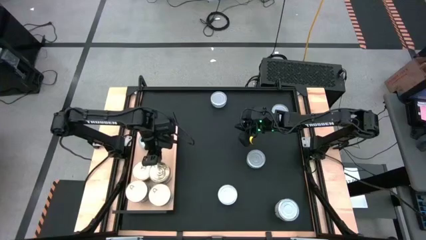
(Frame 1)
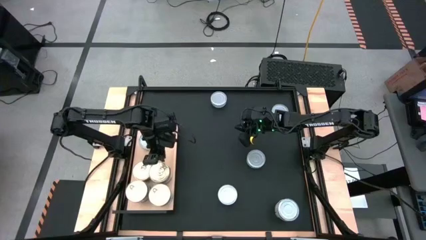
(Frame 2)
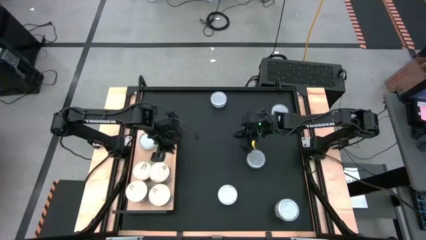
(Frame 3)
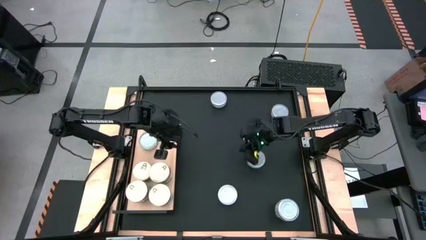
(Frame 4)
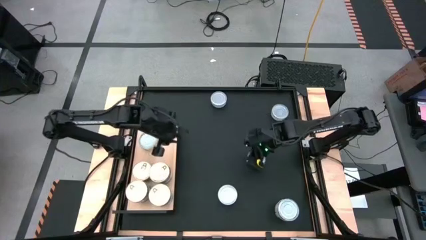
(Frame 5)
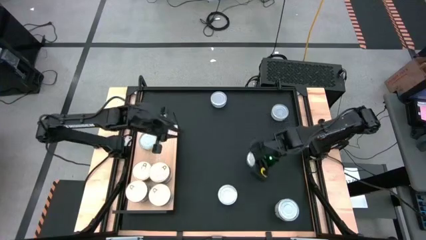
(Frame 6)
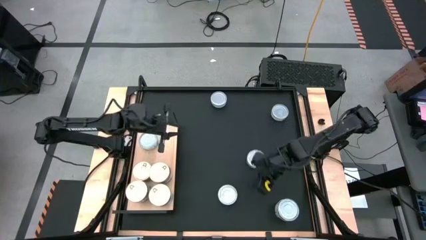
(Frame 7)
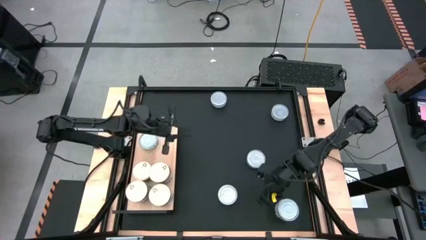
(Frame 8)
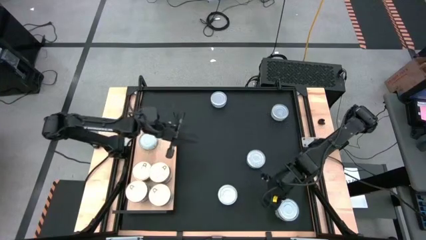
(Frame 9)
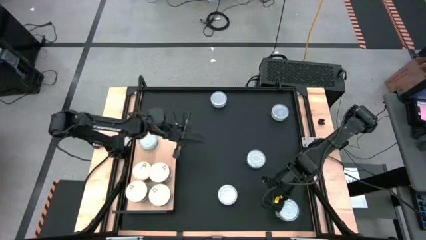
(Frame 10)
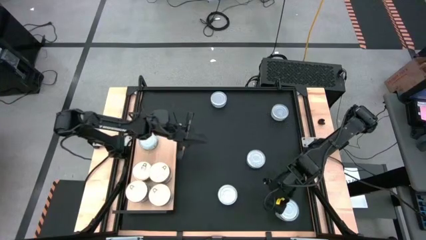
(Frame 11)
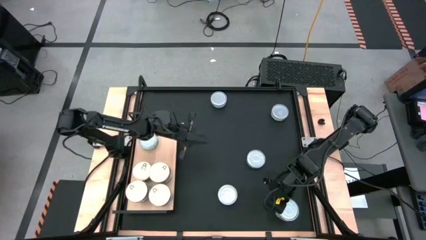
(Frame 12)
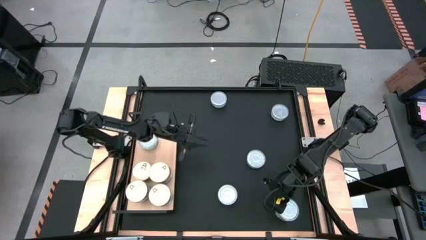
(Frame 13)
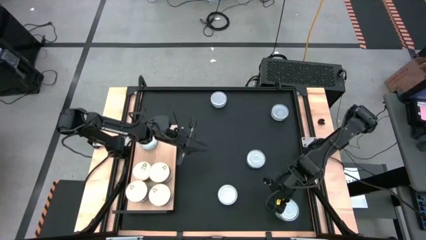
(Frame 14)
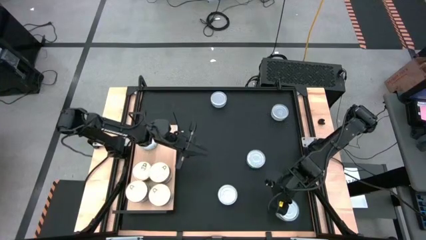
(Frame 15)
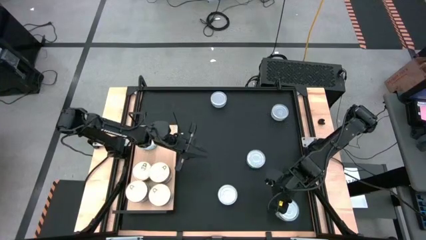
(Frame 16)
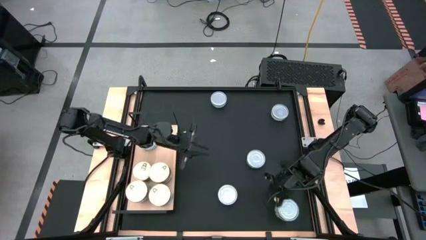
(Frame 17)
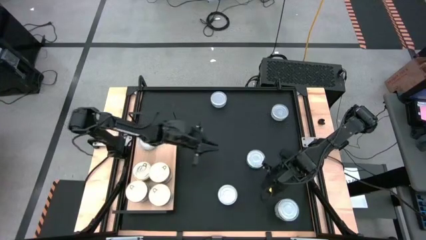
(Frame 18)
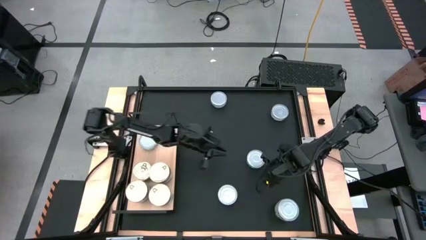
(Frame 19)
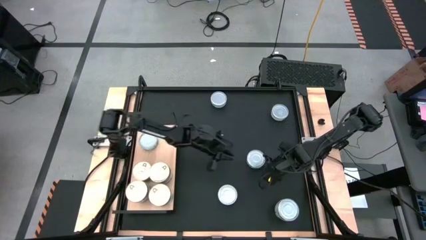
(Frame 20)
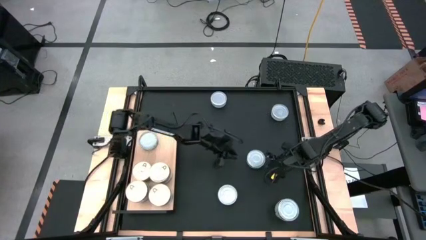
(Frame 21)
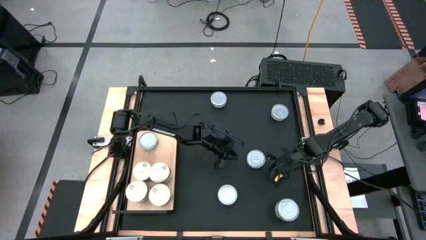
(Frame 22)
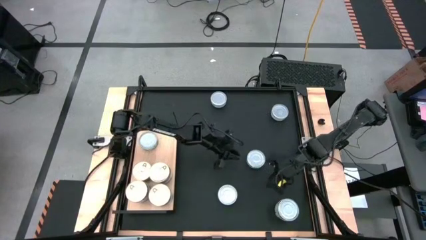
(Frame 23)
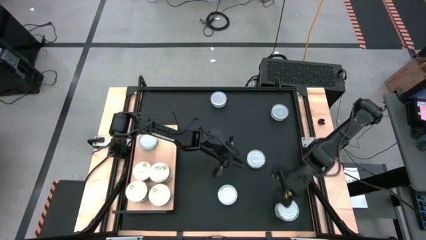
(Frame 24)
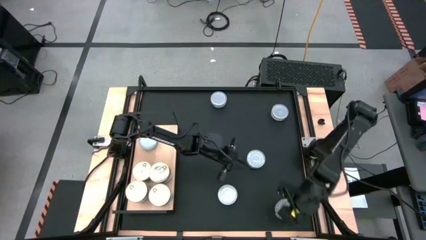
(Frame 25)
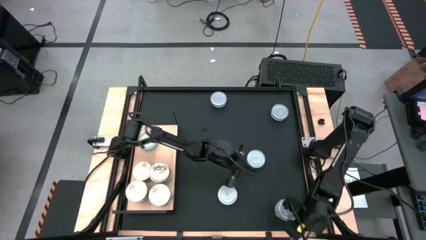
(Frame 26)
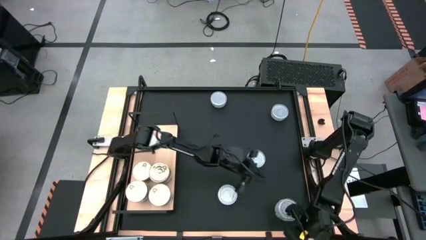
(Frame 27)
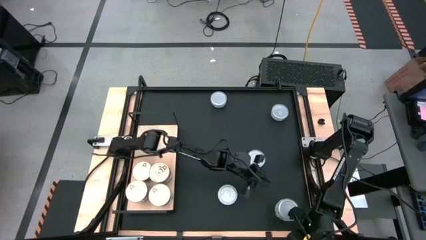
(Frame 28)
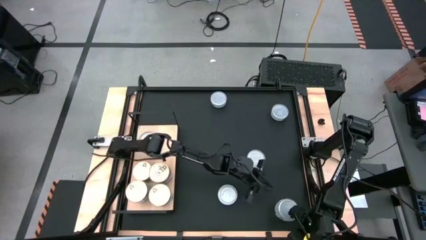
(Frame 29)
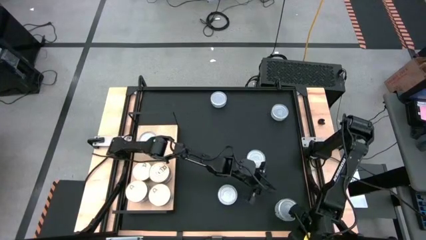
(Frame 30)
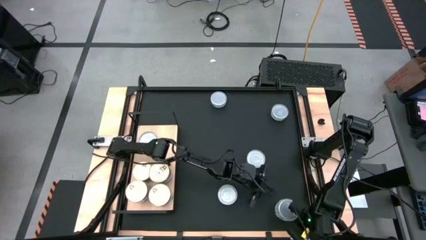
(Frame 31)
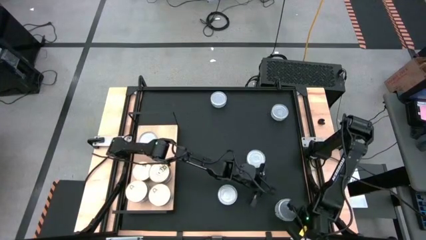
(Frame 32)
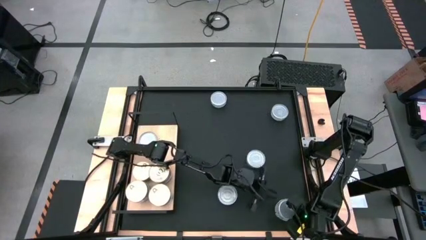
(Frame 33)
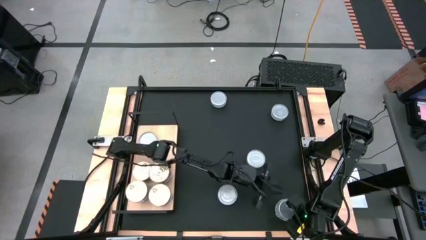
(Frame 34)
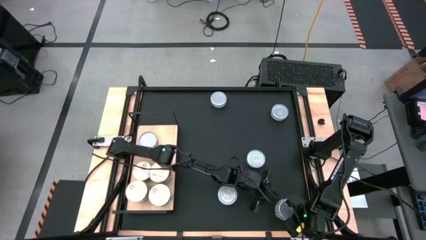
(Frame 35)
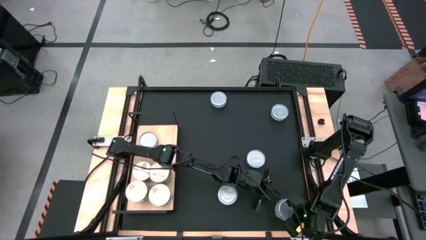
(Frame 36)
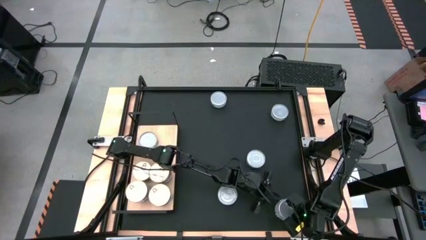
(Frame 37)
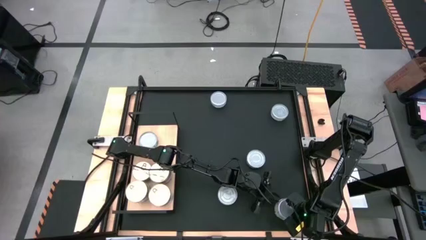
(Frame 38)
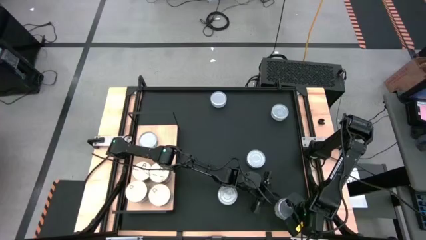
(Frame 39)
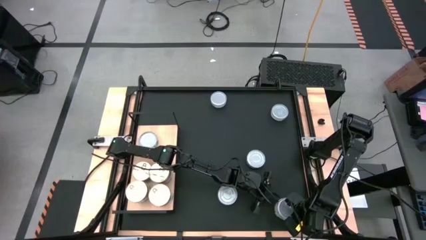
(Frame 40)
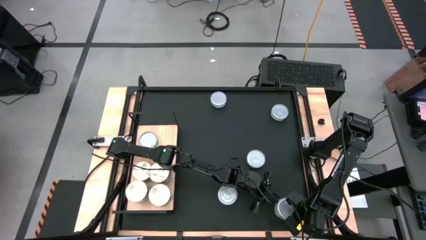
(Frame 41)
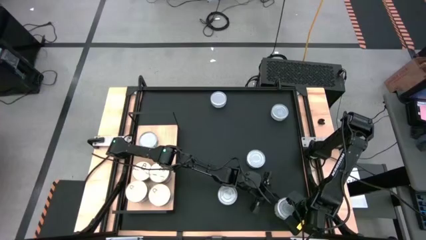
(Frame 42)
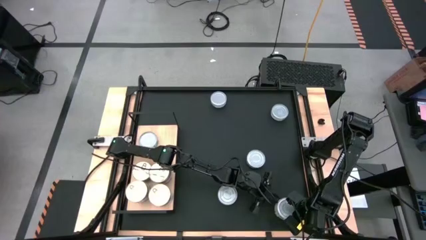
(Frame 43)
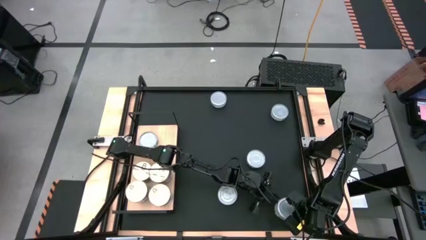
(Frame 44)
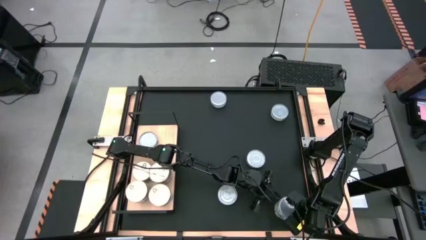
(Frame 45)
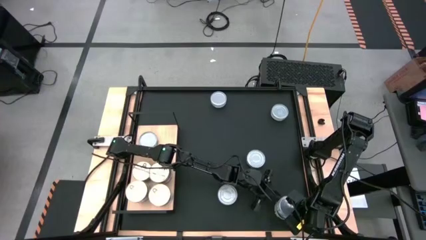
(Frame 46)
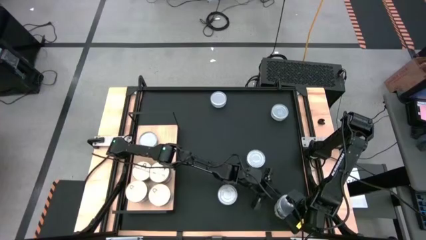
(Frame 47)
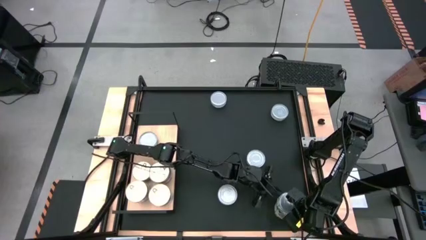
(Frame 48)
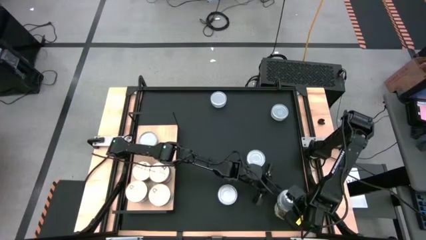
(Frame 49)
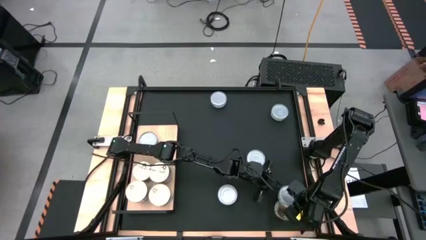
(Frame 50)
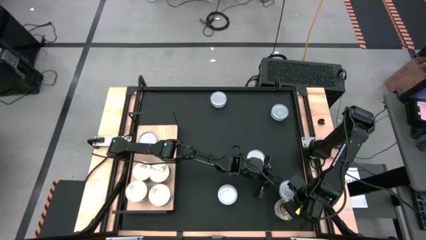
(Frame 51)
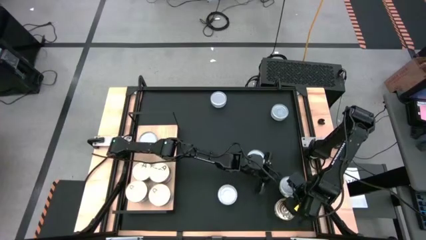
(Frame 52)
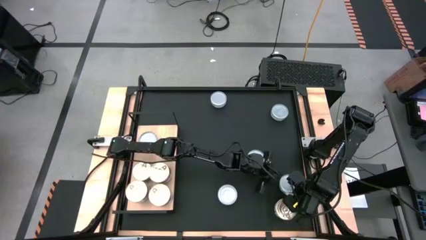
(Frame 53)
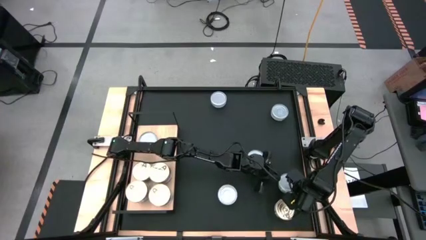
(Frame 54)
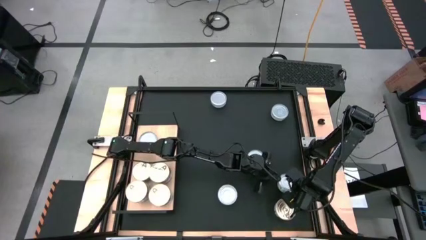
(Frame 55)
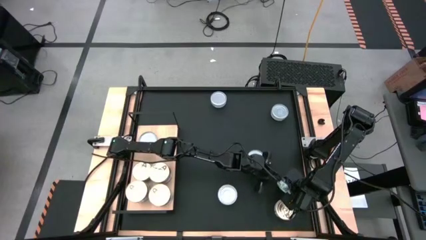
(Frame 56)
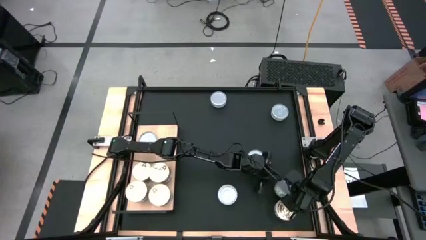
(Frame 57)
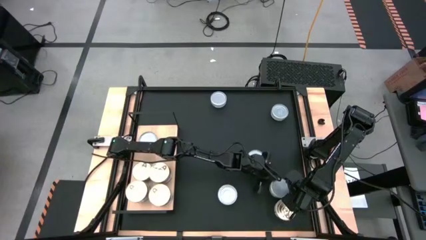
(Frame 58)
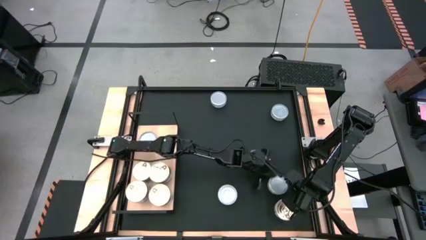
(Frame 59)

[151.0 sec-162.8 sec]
Task: Stack canned seafood by type on shelf
Remove the green tuna can from the top of the blue tuna can

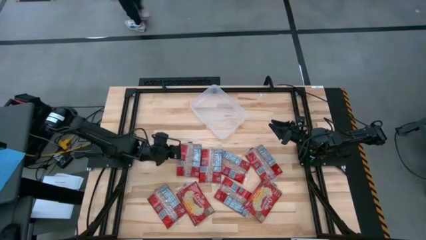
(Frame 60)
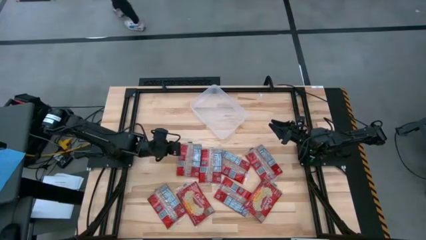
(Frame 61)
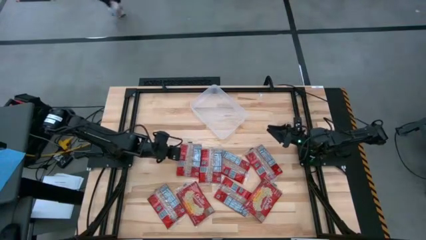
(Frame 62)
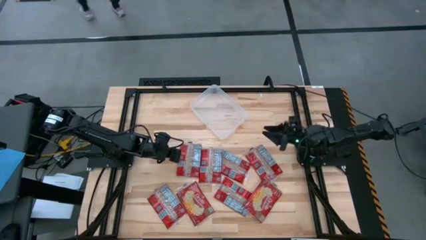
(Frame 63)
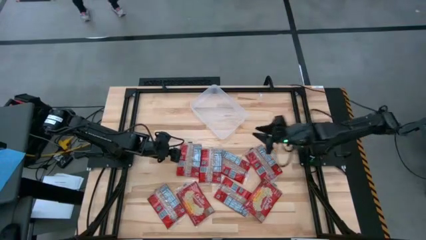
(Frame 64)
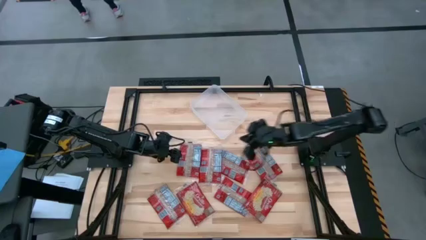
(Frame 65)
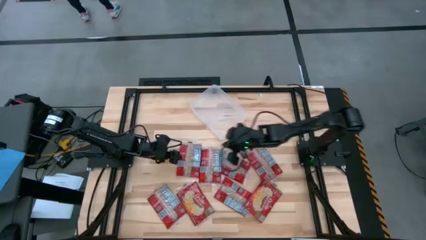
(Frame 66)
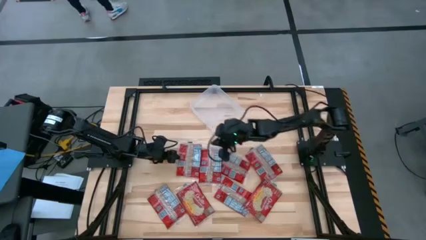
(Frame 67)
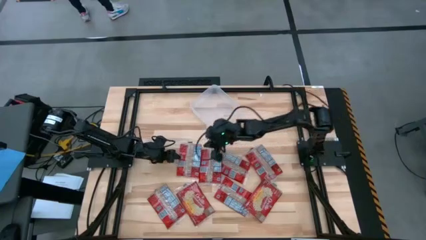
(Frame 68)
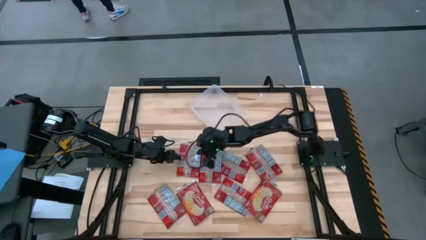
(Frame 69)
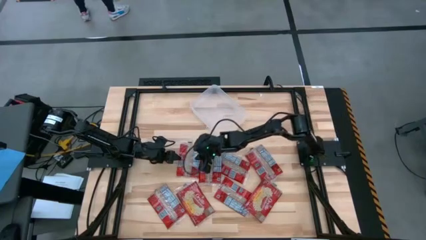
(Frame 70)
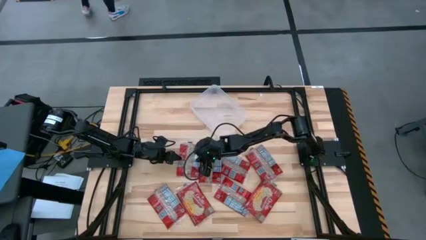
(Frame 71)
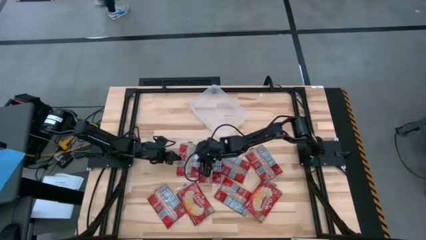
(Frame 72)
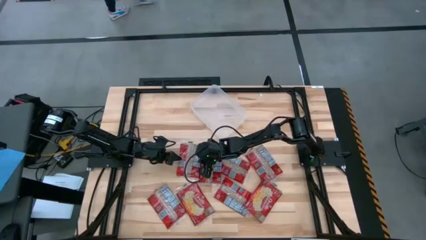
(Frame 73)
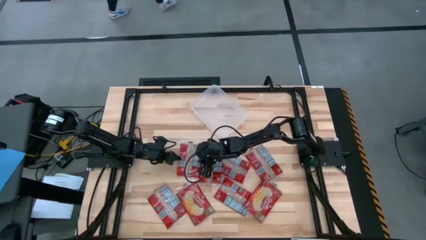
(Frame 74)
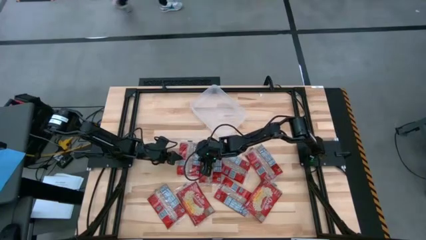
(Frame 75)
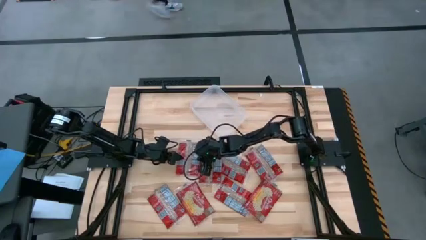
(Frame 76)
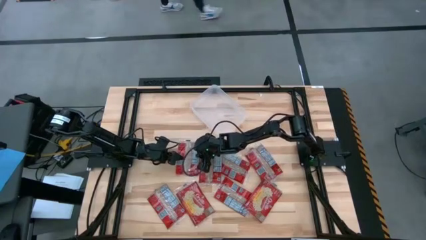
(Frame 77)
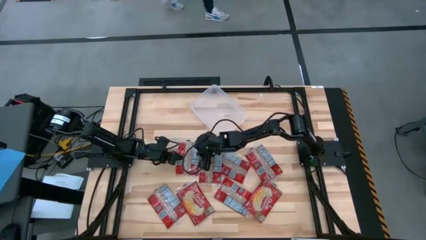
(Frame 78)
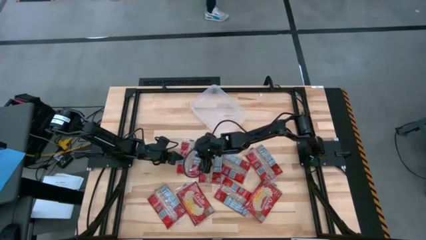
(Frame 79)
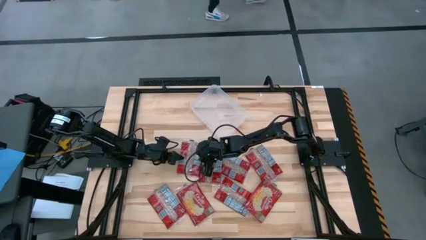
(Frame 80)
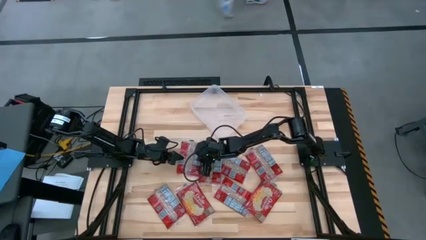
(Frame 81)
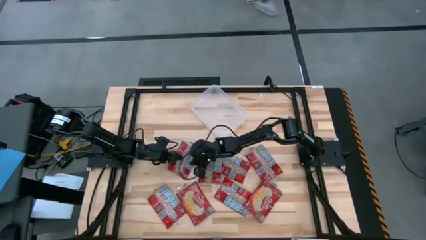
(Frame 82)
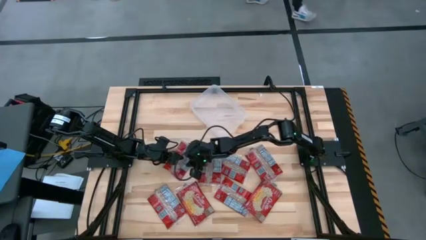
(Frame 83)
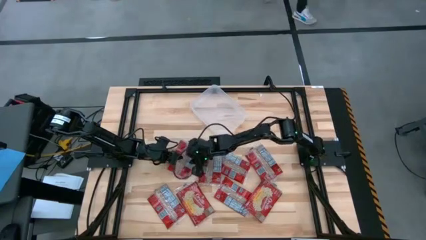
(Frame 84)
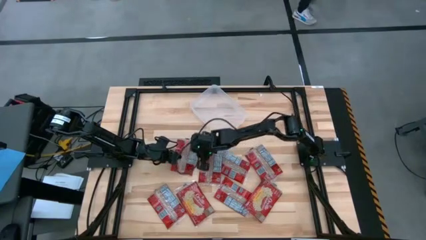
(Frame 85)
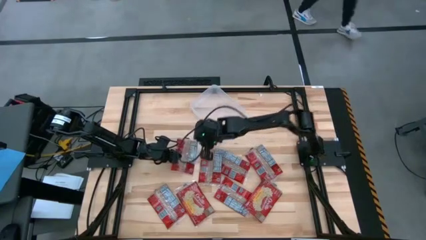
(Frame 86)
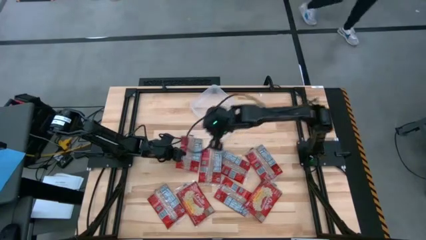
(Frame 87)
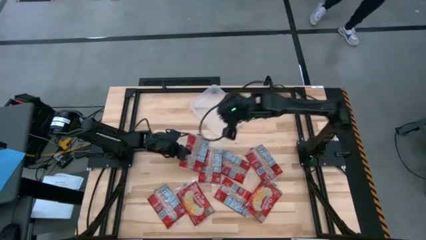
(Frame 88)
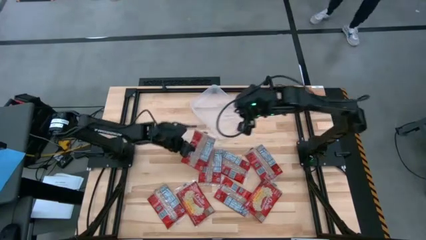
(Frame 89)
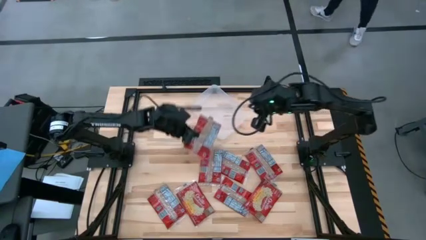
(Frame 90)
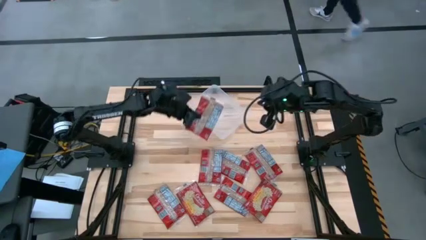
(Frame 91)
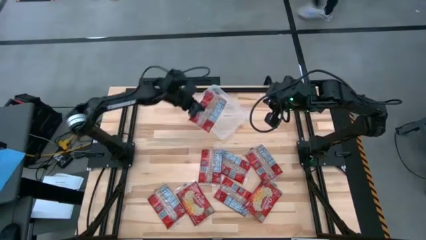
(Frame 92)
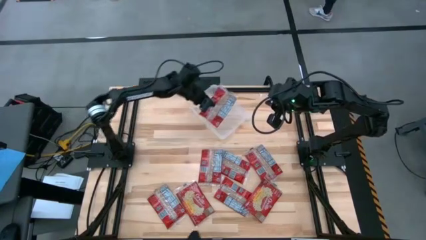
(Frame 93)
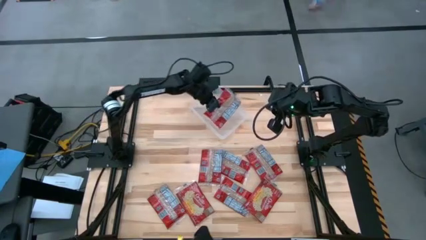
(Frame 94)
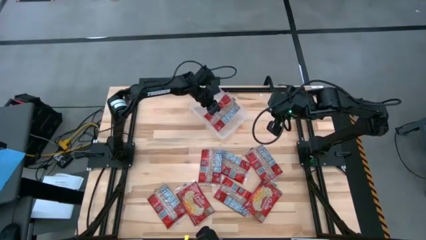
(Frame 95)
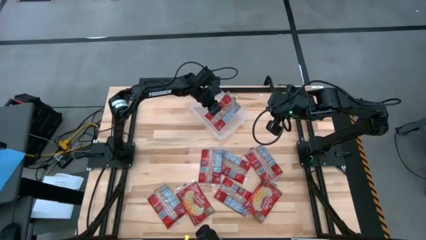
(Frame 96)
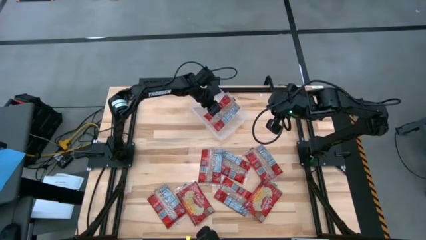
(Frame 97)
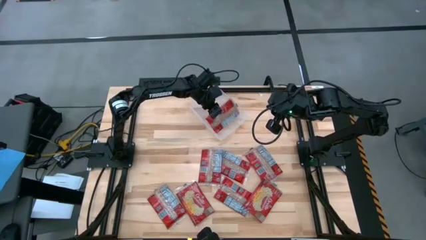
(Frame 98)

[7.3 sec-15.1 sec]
Task: Sort popcorn bags into baskets
Put the red popcorn bag into the white bin
